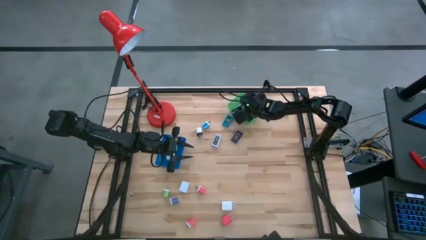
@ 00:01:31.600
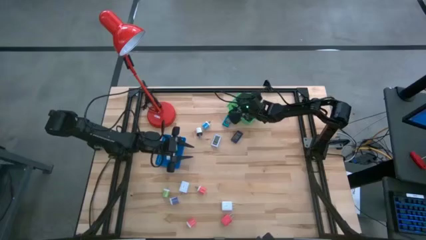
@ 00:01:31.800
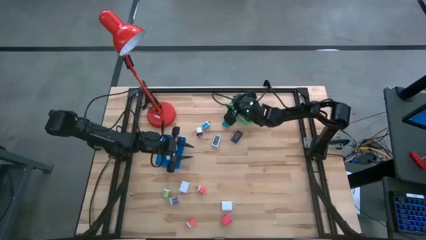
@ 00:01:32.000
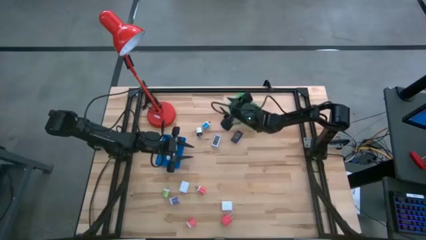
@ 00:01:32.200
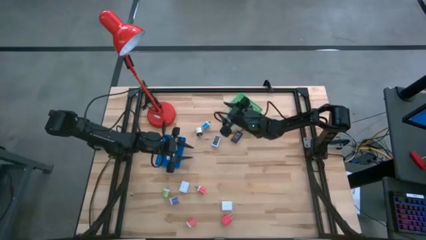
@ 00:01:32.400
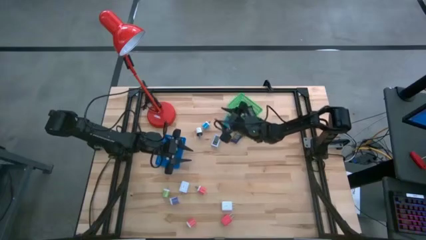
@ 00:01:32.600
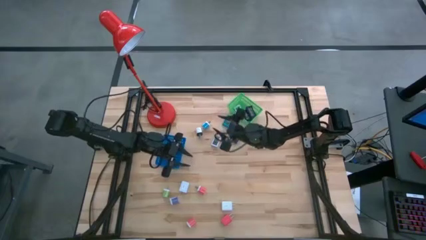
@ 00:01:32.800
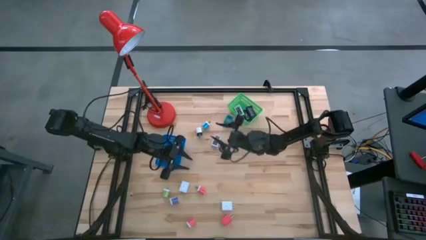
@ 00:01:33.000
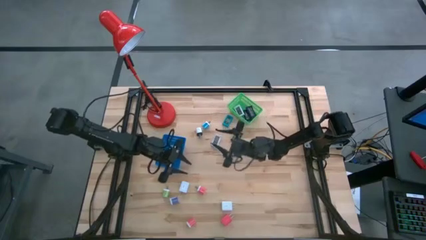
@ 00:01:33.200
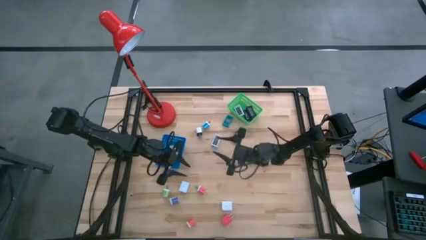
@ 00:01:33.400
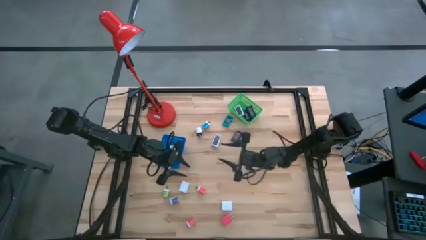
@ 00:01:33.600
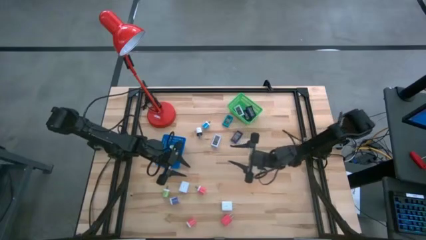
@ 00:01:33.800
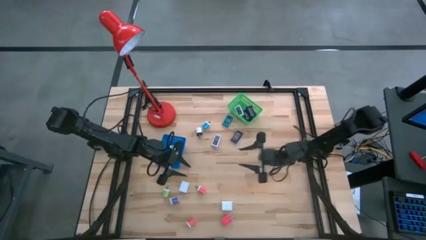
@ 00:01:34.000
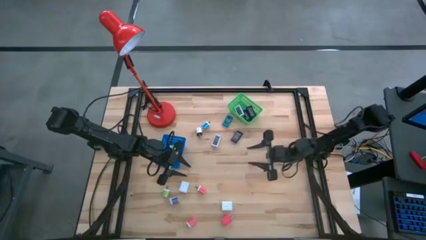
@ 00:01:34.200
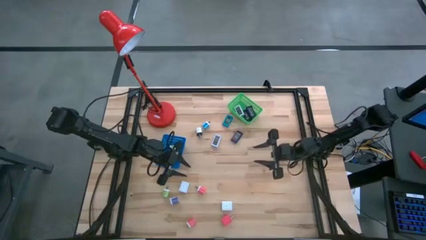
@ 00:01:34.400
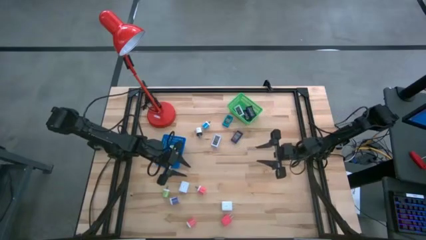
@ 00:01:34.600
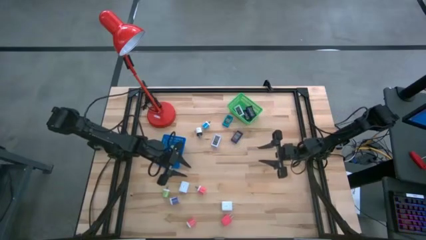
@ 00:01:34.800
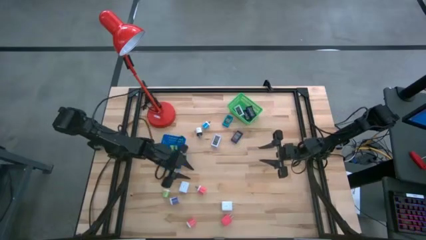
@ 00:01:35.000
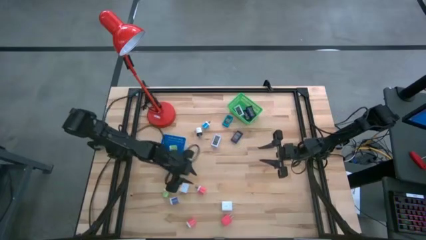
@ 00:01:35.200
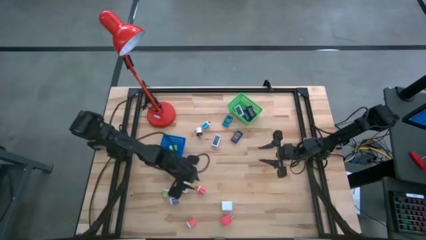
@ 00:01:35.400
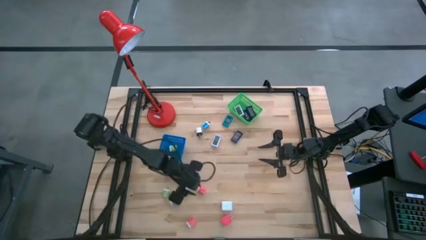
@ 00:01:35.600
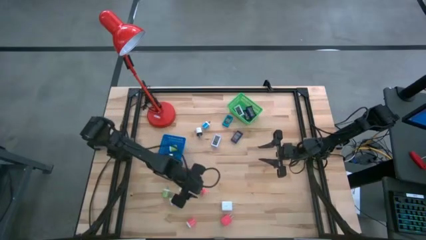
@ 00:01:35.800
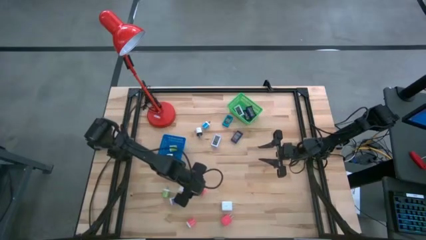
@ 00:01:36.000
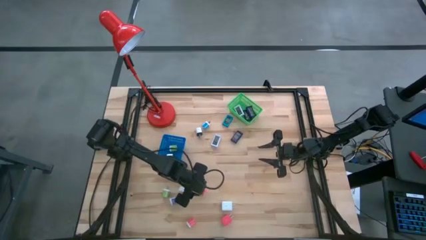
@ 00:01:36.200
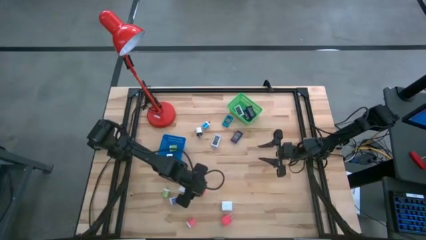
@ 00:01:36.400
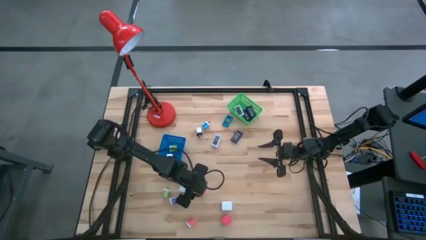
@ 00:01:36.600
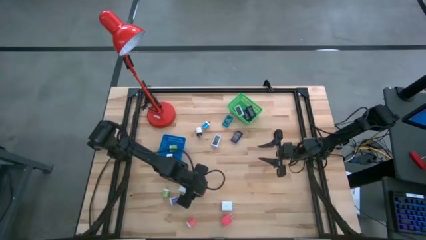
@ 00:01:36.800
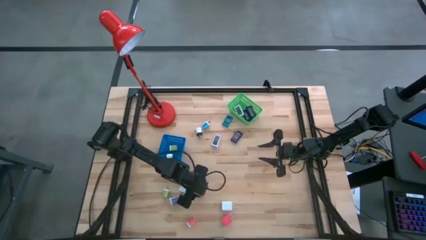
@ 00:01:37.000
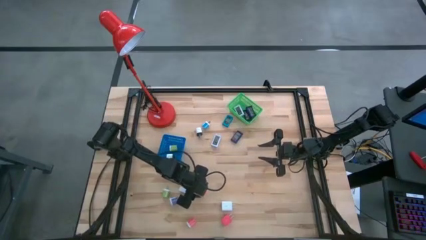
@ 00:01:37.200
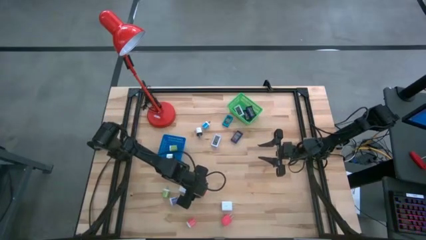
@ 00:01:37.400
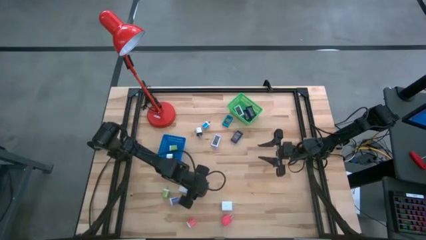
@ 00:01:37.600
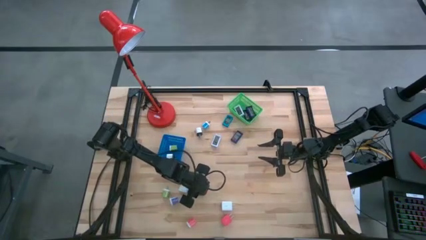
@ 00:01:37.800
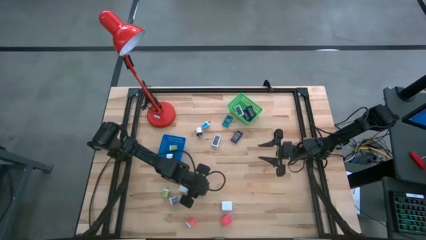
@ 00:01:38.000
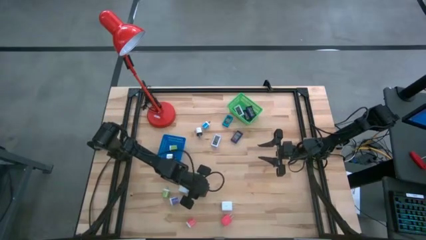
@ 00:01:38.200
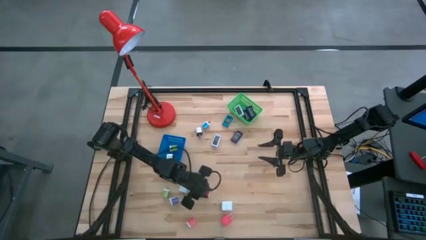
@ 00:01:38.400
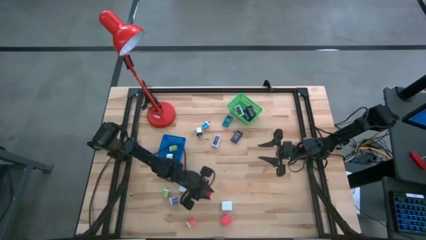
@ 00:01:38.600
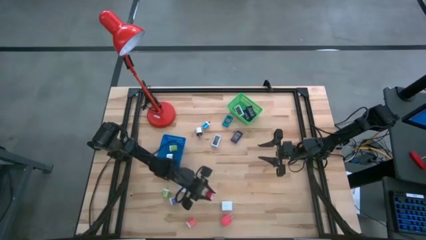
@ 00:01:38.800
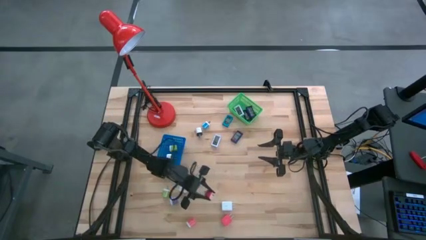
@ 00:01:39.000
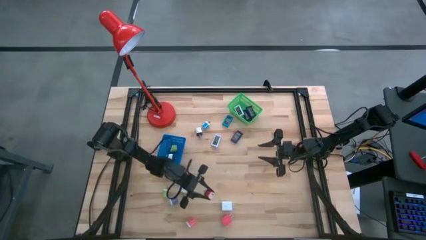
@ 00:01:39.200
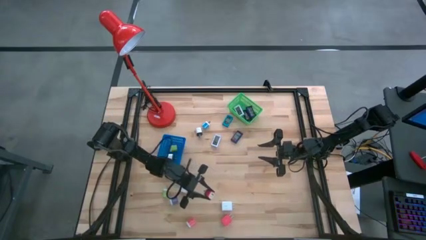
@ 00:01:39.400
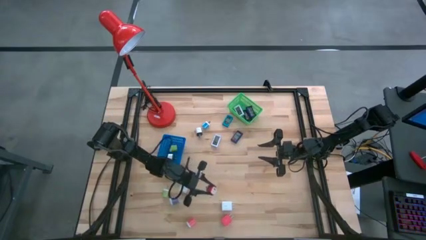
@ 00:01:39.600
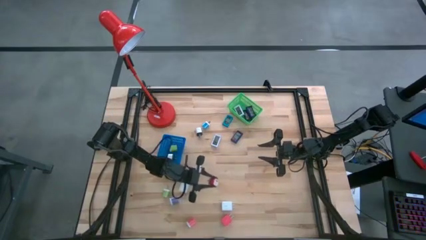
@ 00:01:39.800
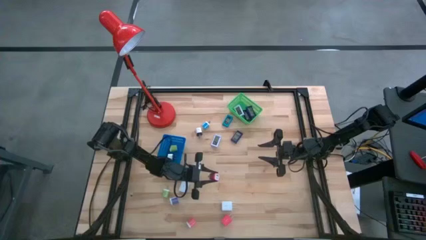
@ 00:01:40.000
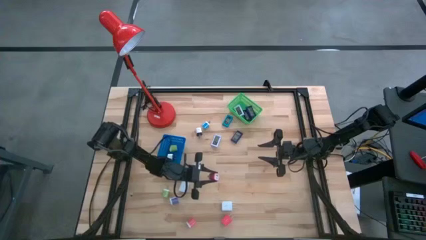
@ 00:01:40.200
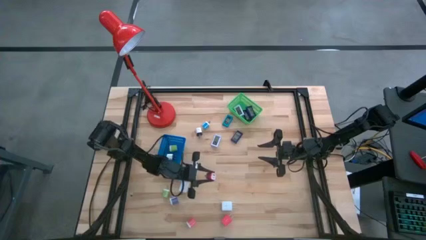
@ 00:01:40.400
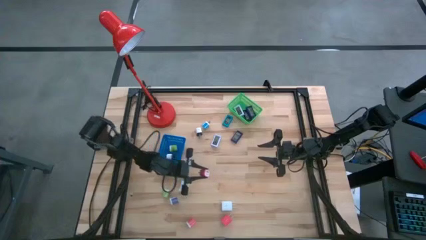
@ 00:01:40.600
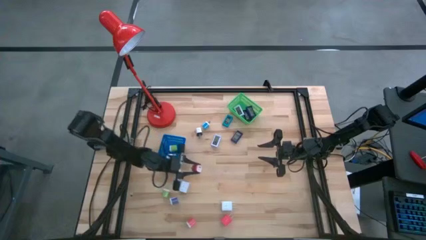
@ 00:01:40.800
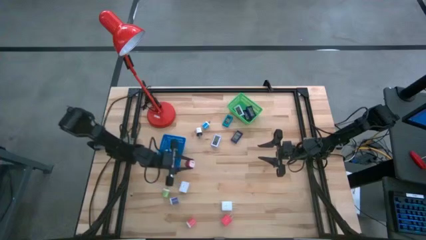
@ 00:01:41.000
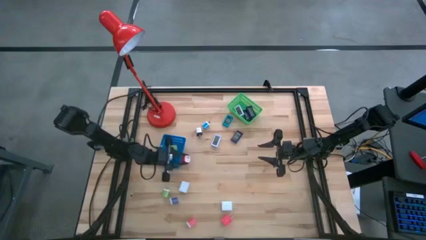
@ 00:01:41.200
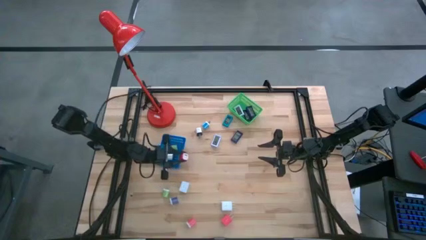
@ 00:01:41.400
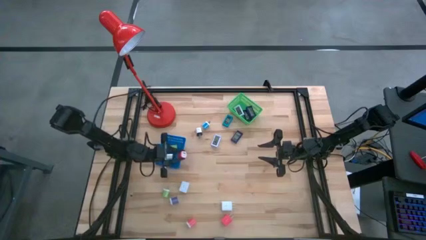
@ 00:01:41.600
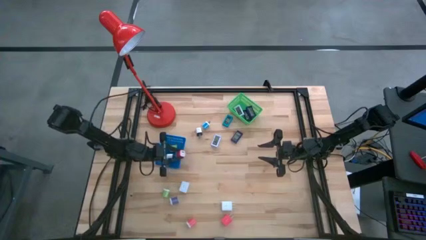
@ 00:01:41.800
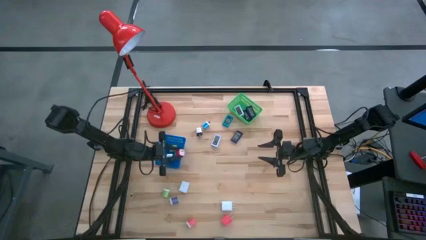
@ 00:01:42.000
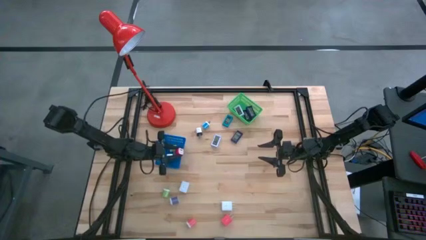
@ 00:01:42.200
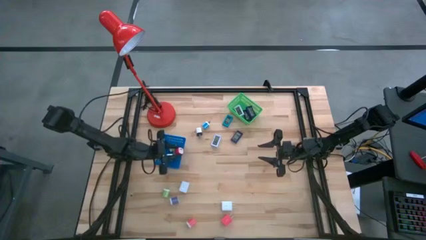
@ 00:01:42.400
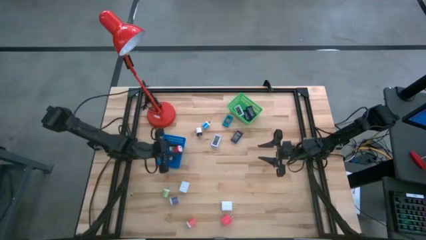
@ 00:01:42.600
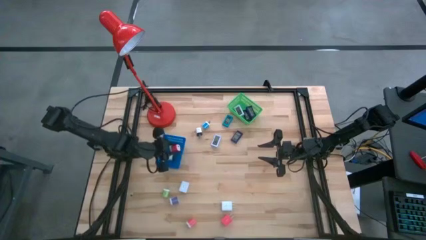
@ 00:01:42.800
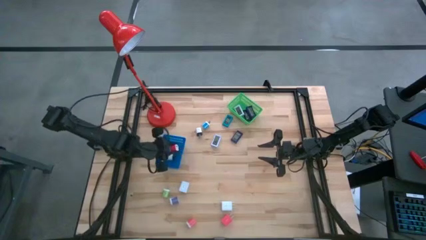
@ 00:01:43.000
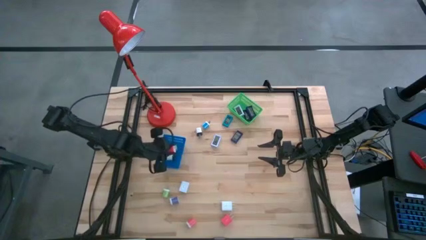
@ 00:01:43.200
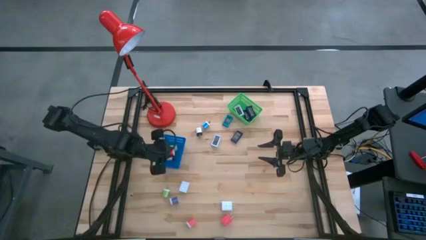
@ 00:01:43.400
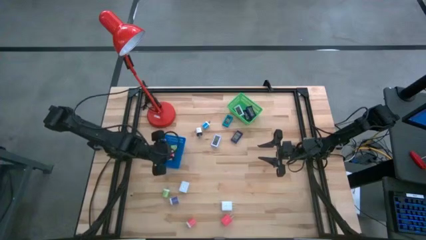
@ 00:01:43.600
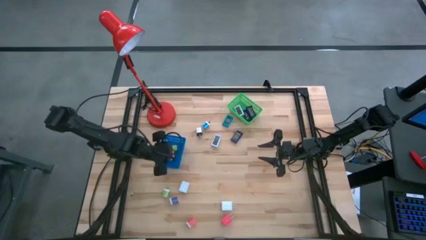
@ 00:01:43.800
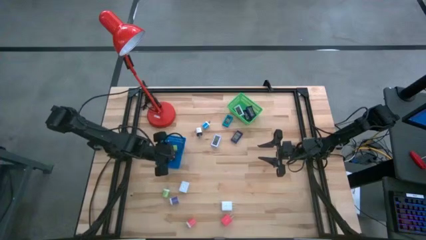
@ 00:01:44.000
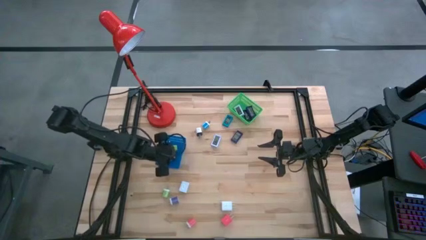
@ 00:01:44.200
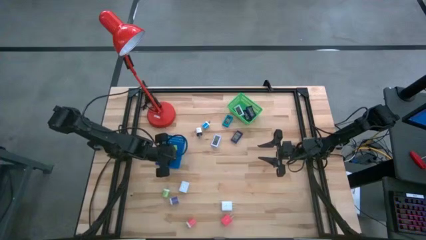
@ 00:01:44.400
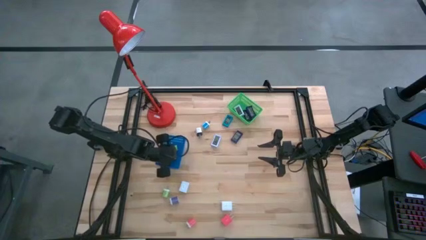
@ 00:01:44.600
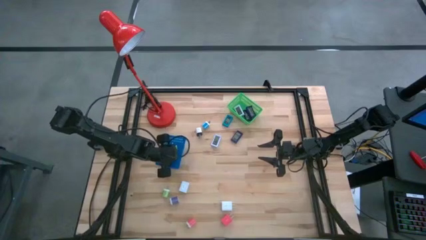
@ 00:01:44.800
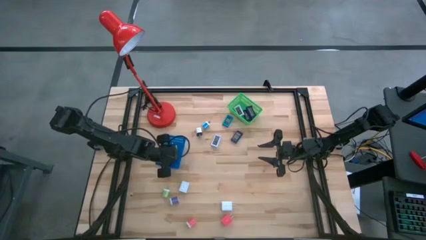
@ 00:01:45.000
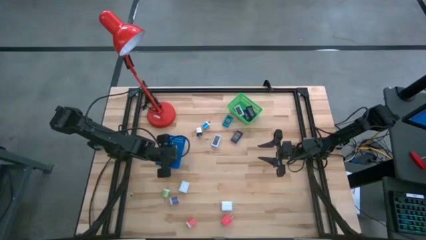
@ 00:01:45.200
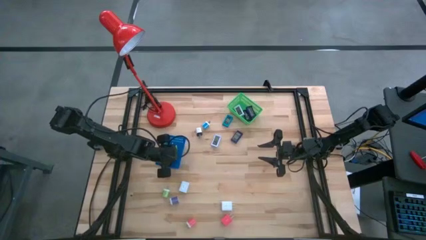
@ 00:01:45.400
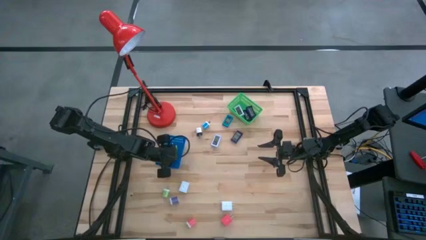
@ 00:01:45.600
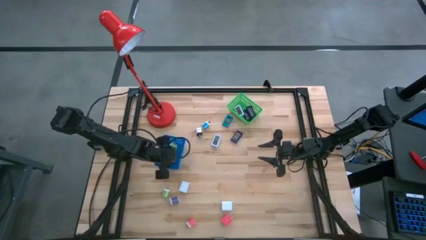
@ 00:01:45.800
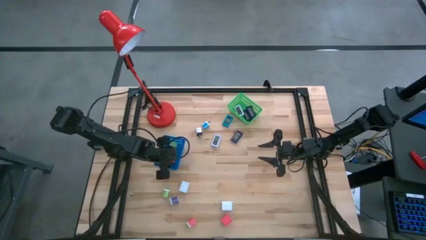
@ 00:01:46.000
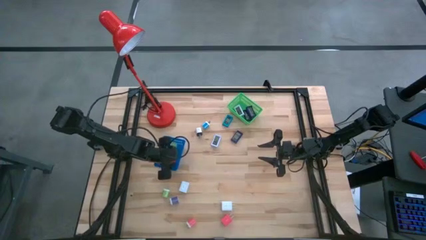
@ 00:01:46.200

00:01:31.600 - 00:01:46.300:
Task: Pick & Place Office items
Put the top pink white charger adapter into the blue basket
